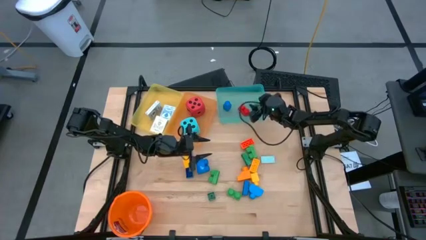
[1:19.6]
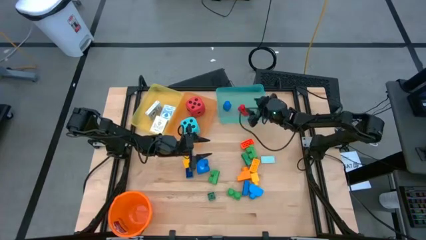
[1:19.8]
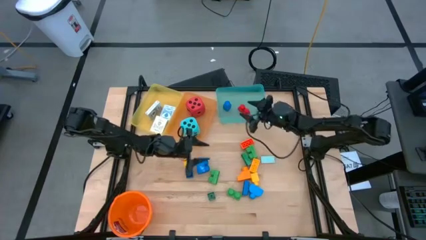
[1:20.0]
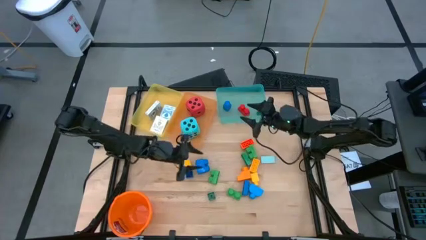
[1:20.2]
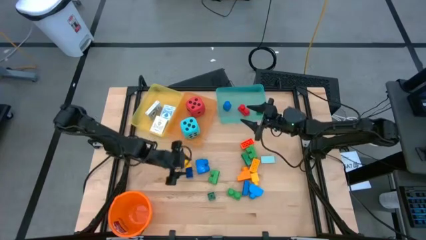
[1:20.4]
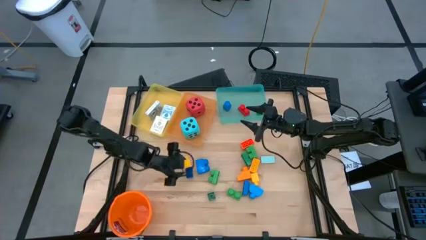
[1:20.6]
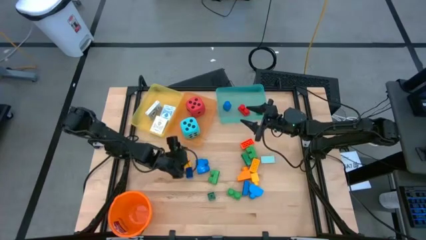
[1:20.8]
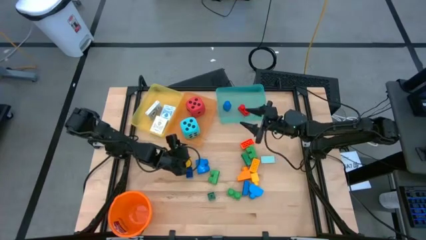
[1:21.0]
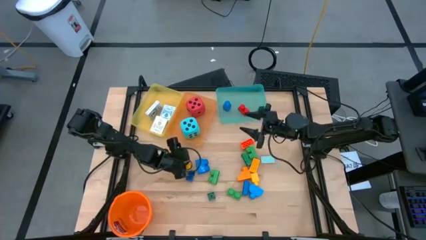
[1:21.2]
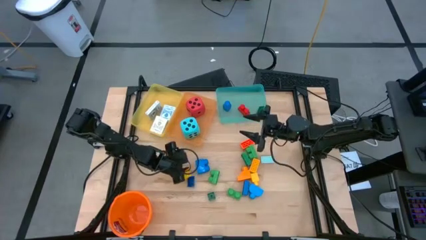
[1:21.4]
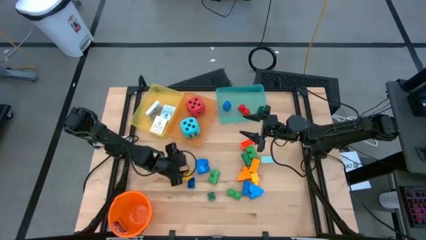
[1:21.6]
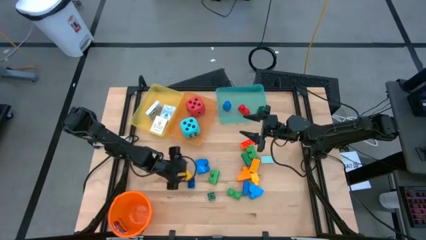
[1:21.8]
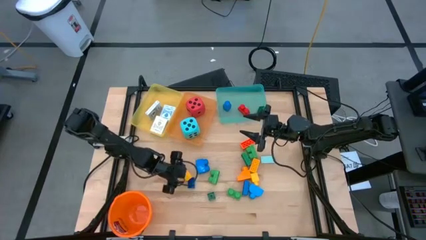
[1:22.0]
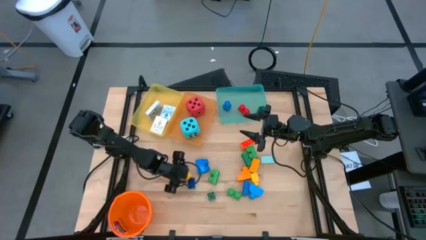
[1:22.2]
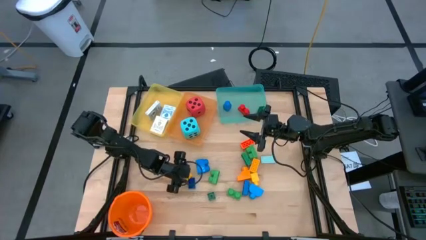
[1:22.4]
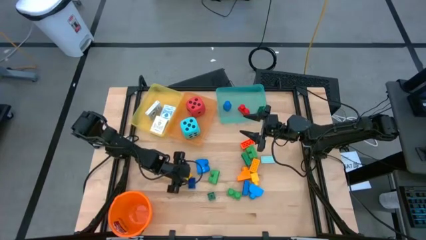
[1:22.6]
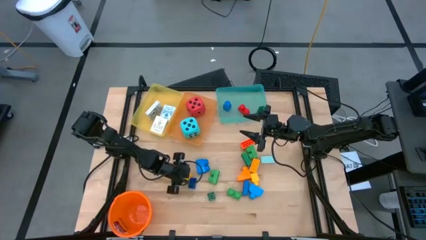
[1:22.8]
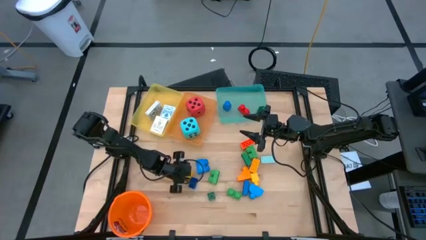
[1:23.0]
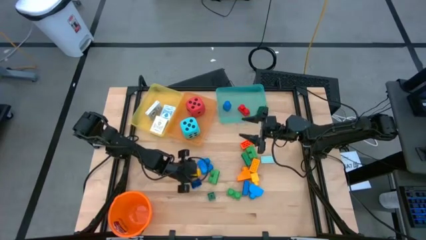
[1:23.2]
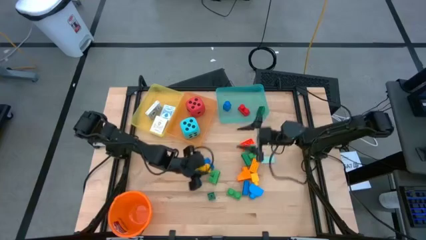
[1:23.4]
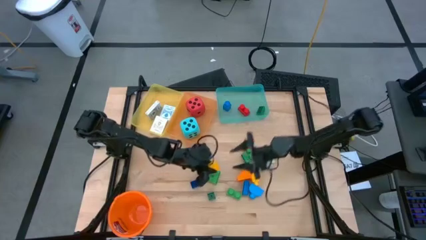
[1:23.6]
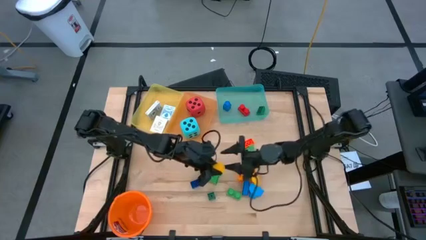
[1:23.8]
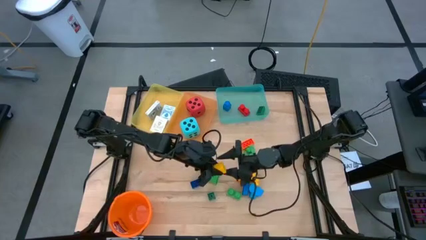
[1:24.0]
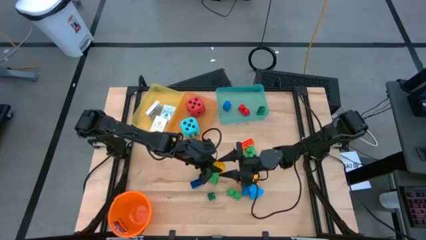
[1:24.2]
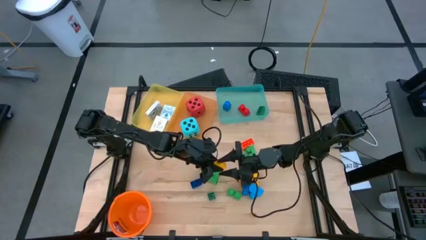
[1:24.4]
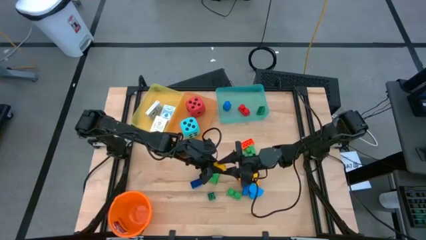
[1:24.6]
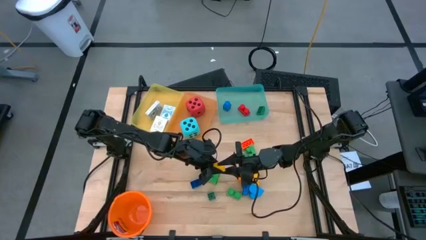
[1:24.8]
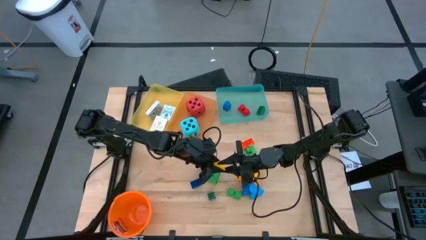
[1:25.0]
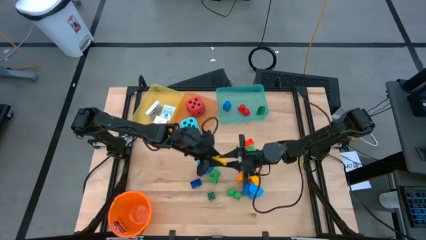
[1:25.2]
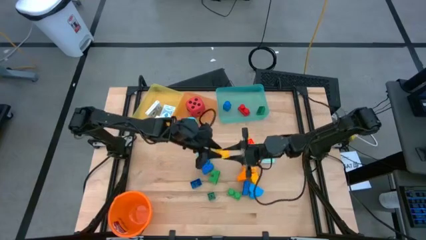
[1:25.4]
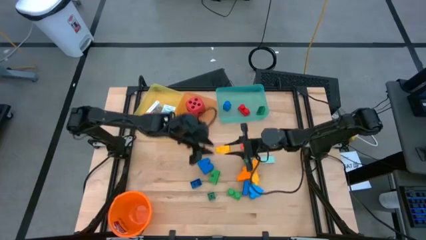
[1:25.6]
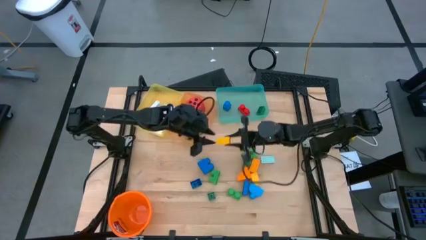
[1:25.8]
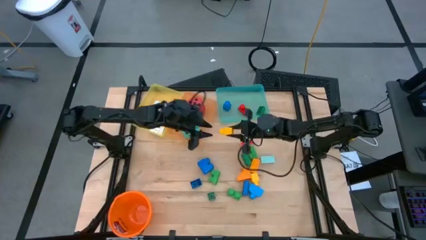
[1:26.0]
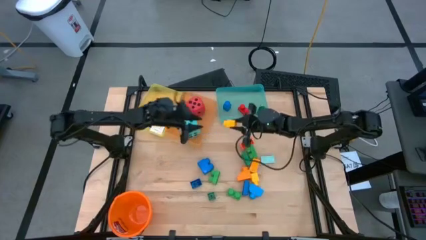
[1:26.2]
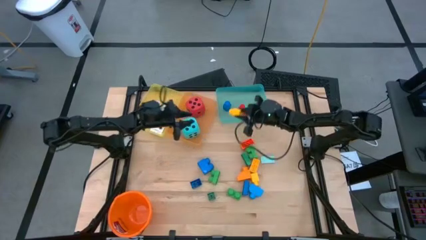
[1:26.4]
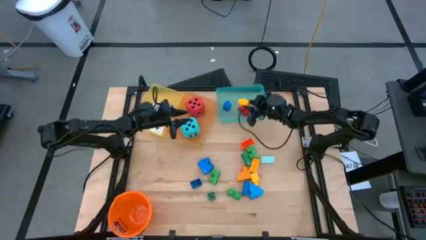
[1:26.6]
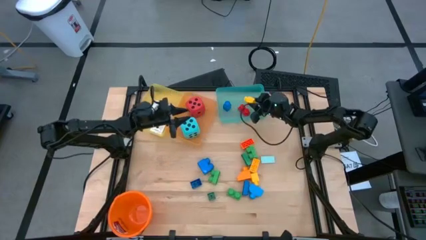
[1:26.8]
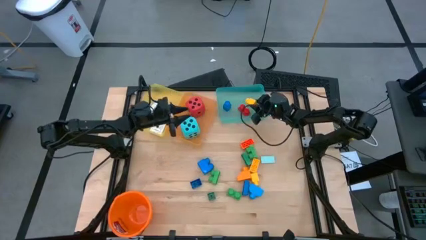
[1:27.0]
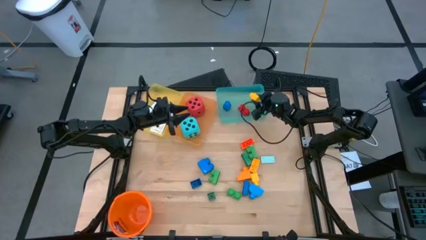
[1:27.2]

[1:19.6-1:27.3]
Task: Pick & Place Toys
Put the left yellow game piece into the blue bin

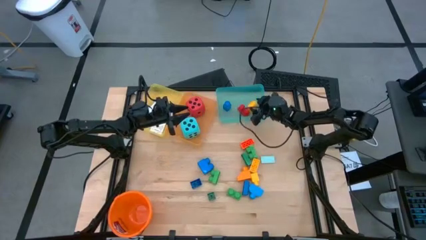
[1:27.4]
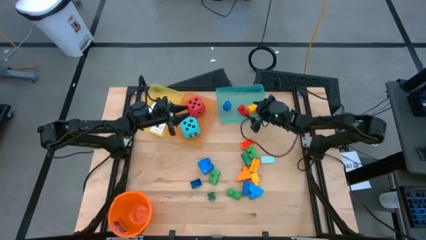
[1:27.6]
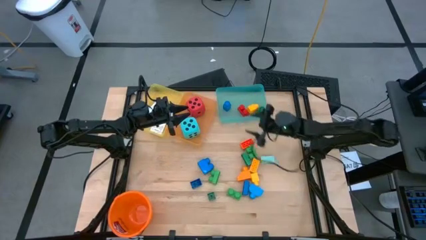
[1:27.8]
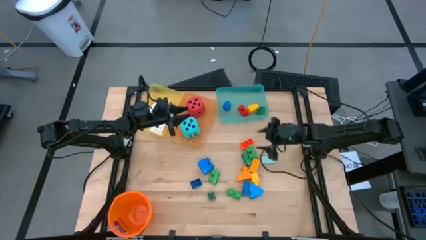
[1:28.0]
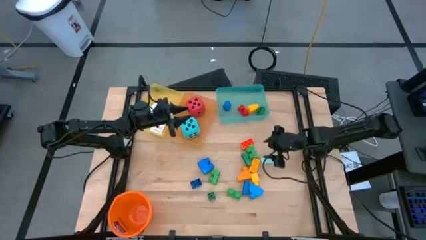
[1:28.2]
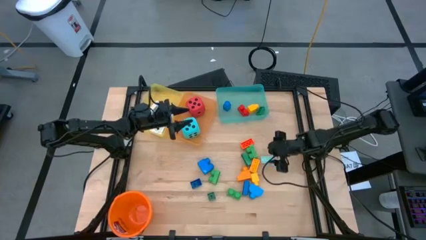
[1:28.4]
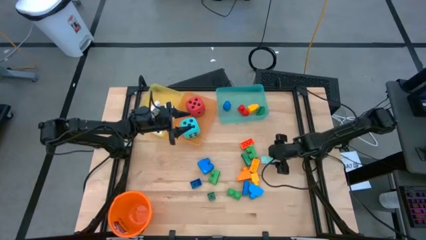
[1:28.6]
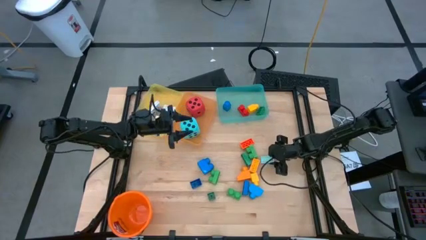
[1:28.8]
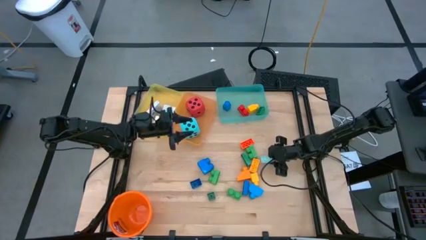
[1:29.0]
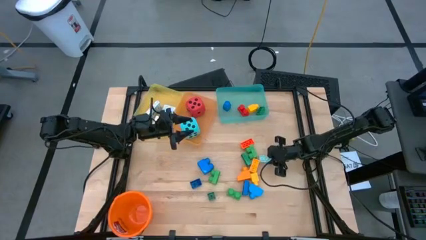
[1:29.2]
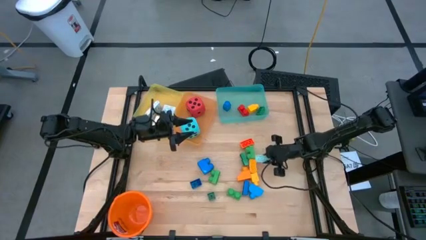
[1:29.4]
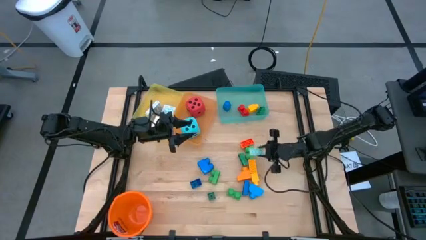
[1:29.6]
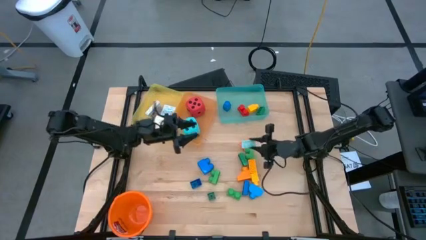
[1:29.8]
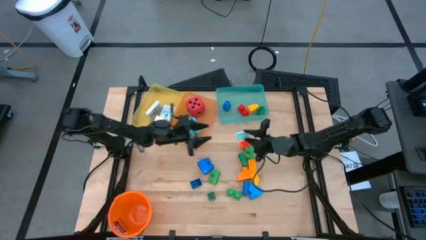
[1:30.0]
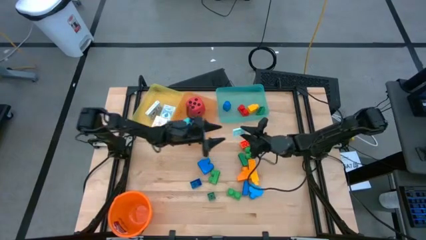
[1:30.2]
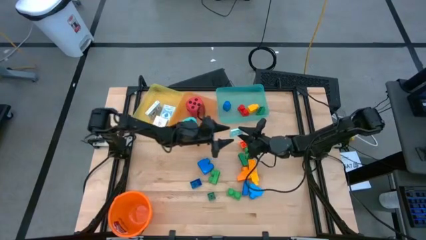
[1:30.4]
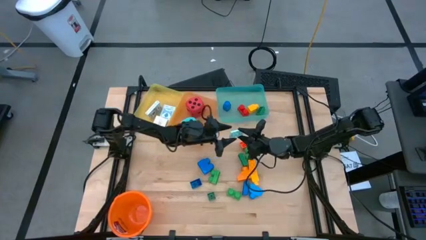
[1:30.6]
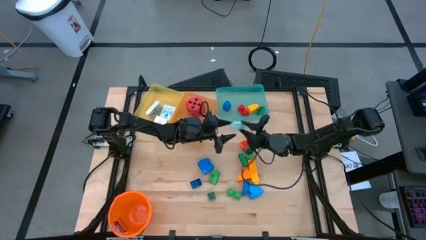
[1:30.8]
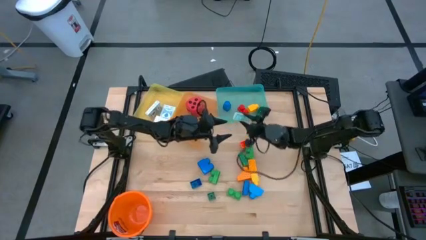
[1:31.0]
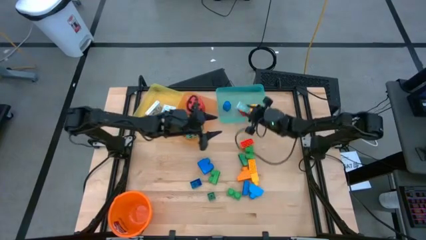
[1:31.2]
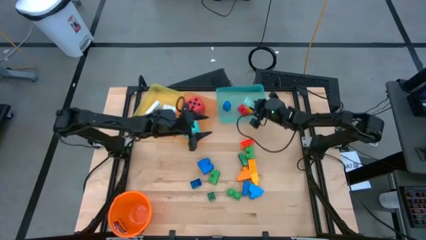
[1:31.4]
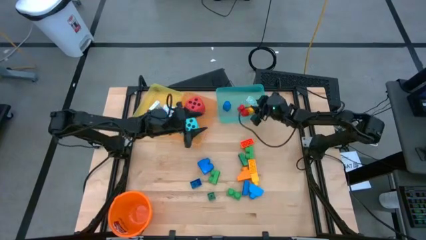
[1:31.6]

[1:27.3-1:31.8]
Put the light blue game piece into the blue bin

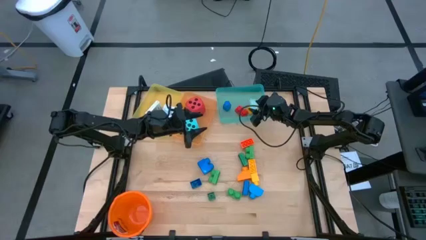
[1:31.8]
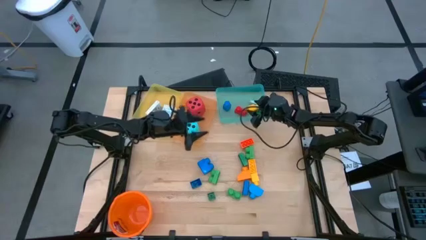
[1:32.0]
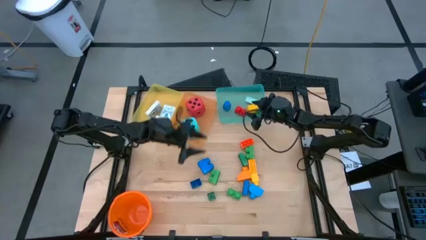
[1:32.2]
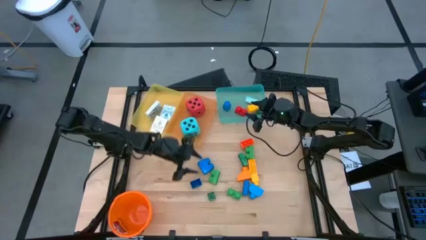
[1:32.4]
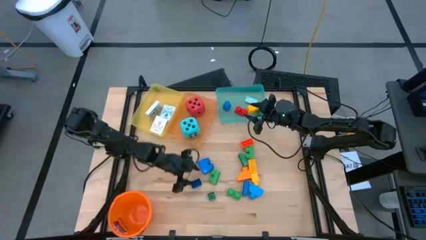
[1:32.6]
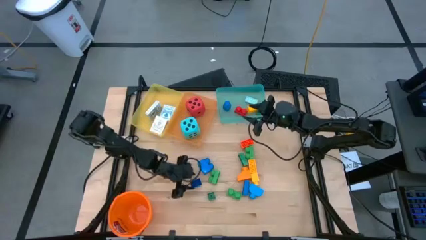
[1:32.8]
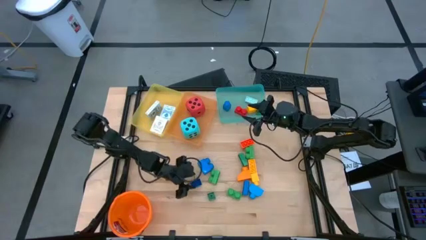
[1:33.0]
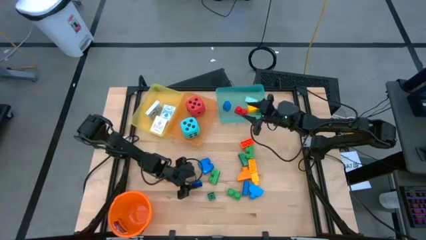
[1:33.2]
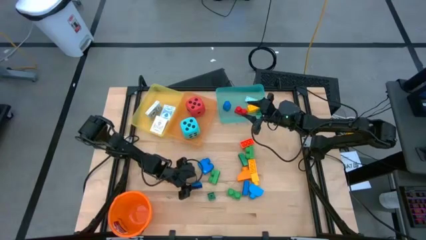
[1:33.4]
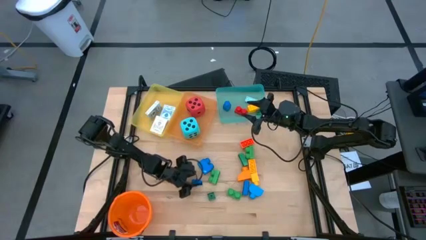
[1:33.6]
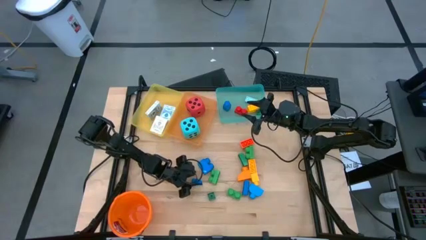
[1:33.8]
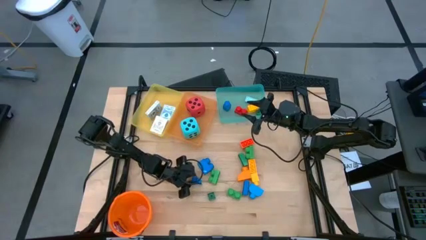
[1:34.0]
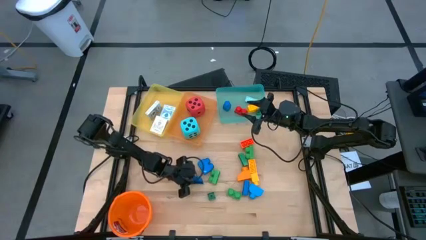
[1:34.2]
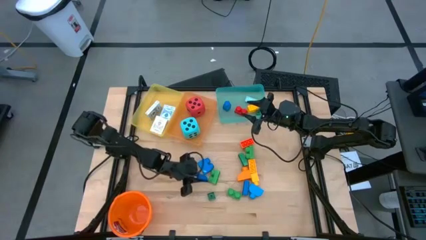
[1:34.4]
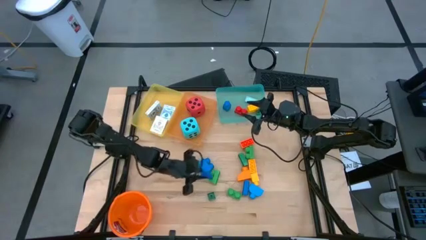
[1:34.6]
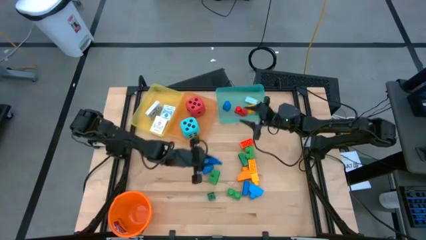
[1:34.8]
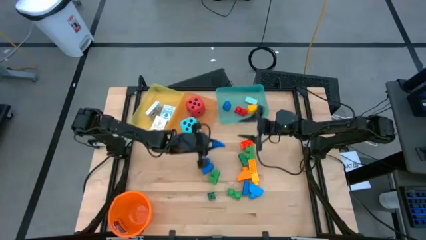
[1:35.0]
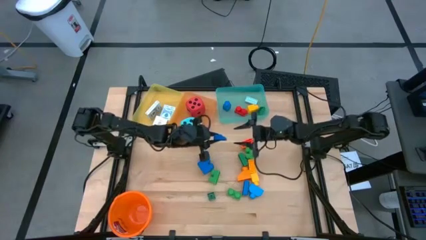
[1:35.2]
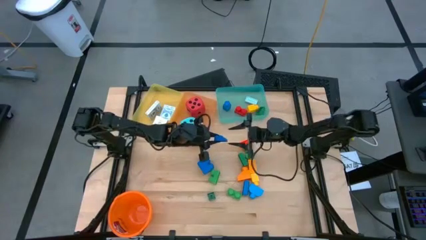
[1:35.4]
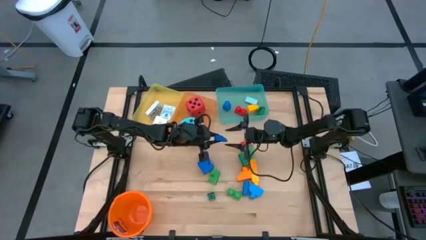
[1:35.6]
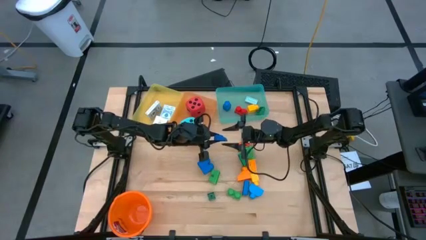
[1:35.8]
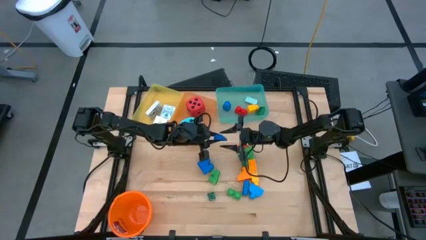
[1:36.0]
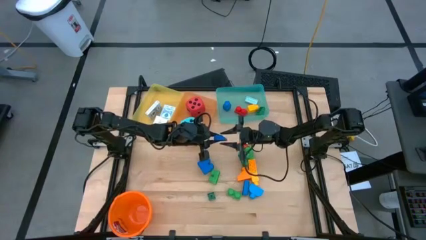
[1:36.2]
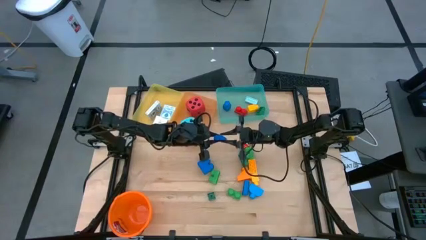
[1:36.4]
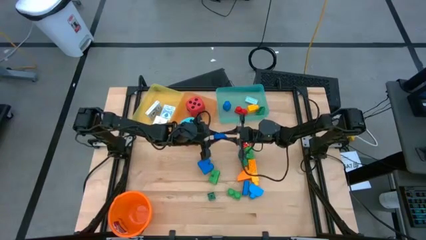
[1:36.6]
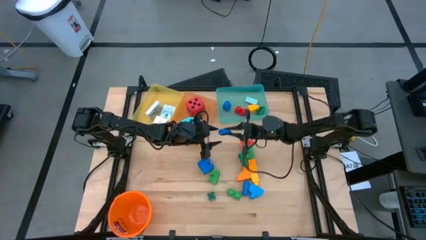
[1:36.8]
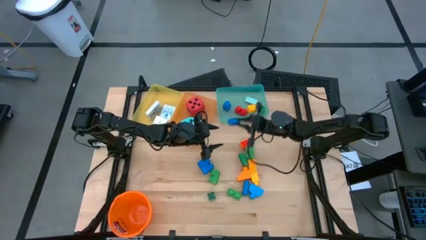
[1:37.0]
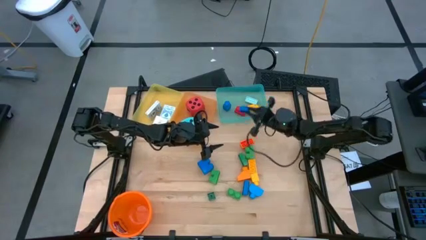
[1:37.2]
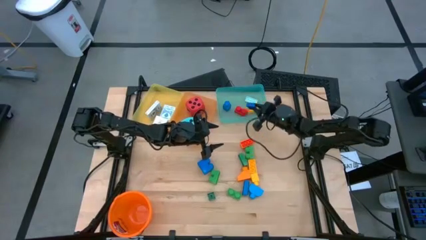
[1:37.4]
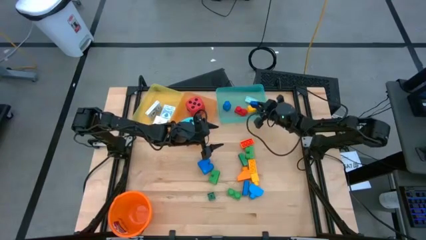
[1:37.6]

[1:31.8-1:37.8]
Put the blue game piece into the blue bin
